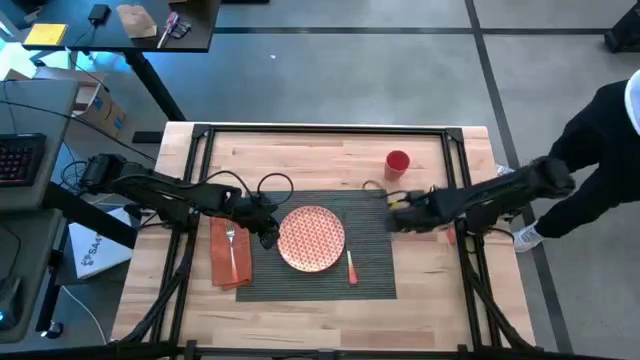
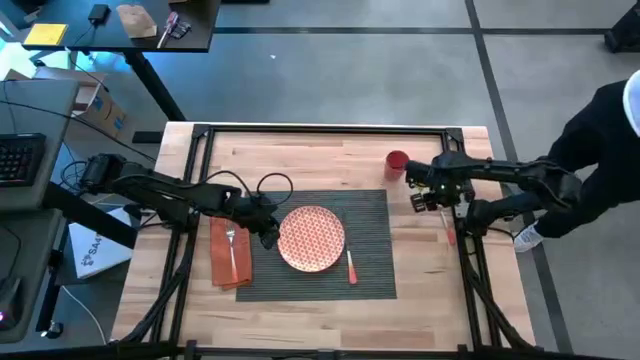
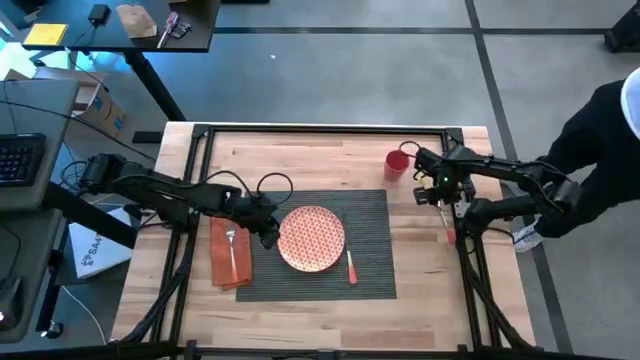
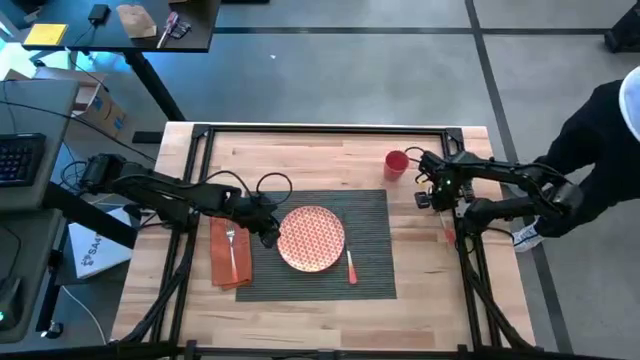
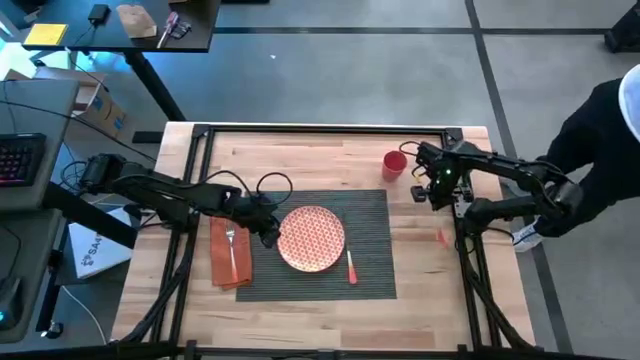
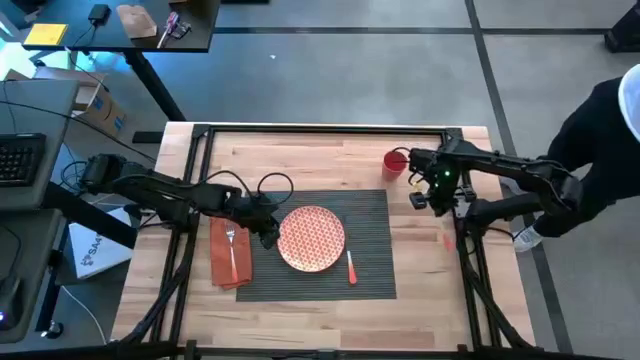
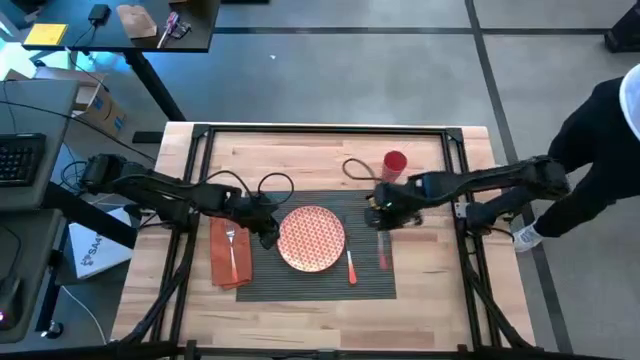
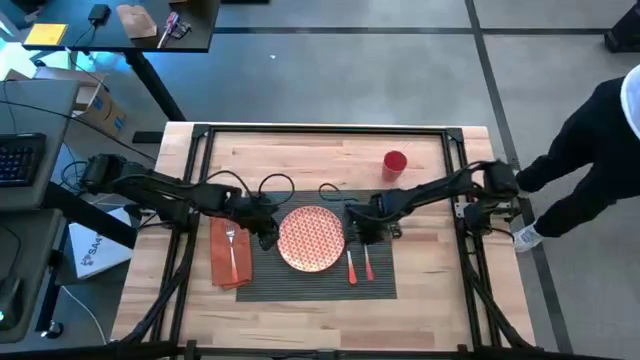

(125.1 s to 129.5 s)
Task: Set table place
Put the orange spoon to the right side of the orange knife on the gray placemat

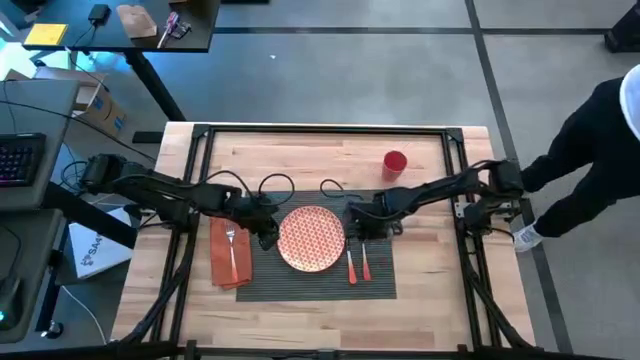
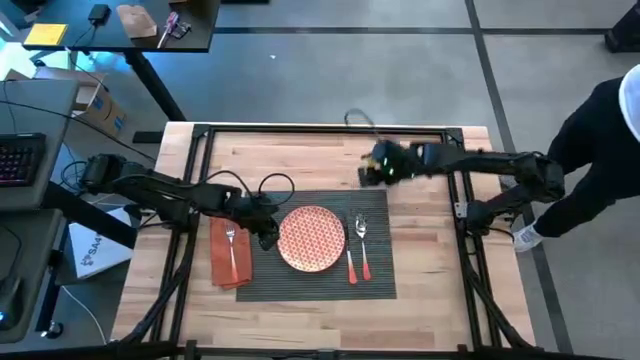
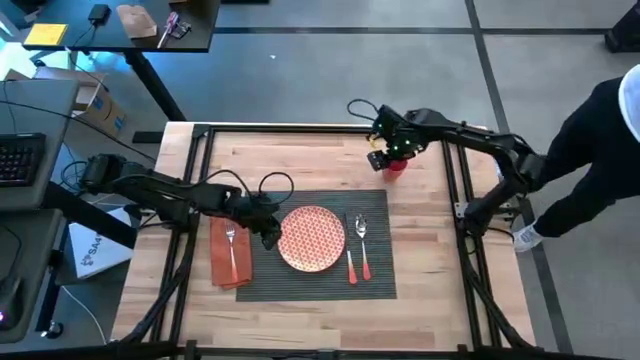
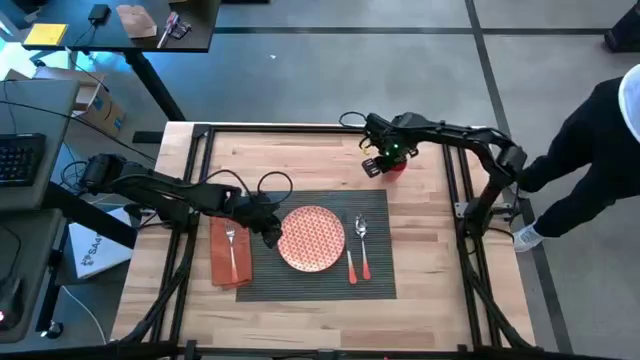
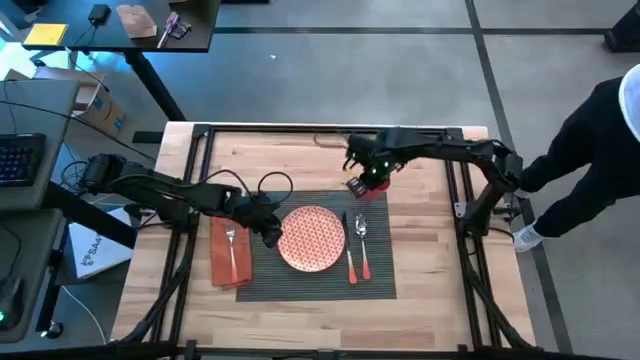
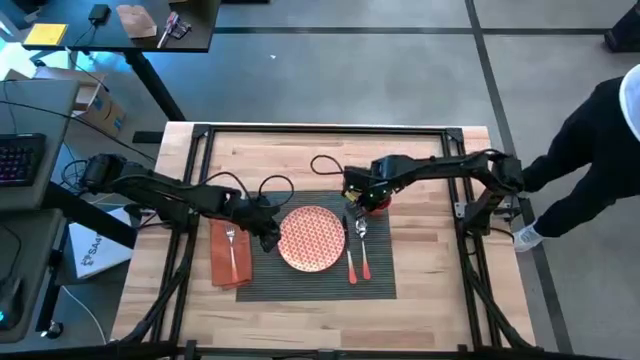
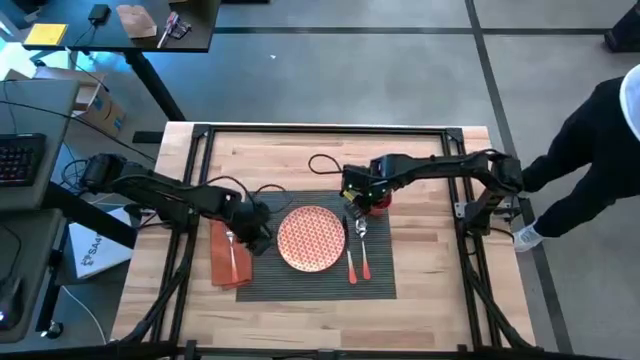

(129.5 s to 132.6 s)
Put the orange cup on the upper right of the placemat

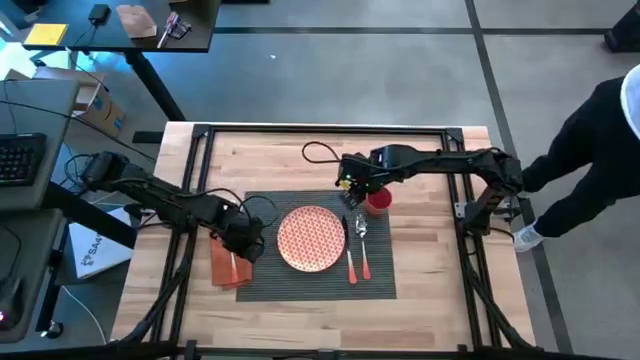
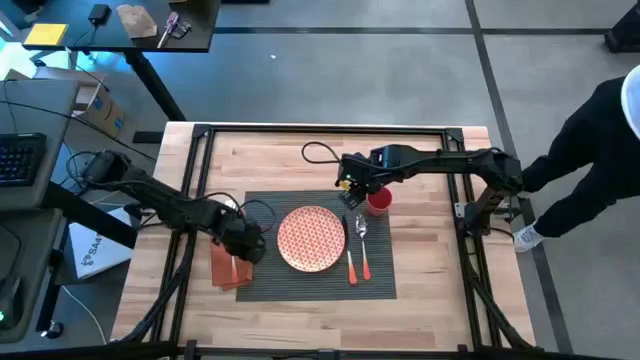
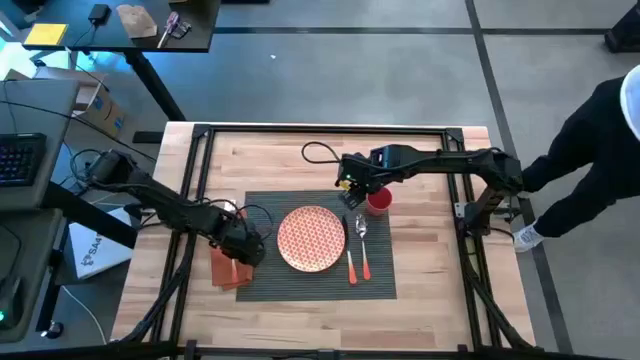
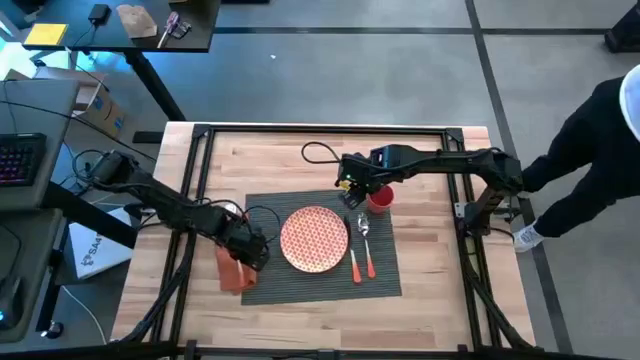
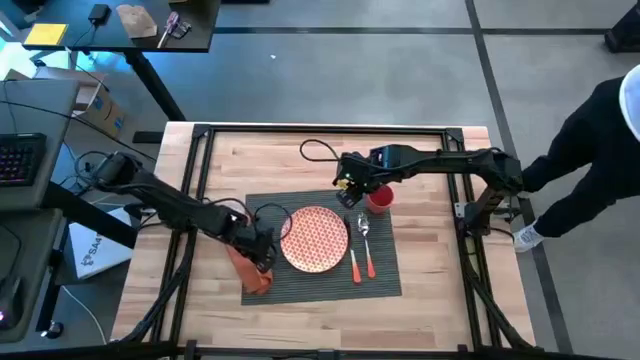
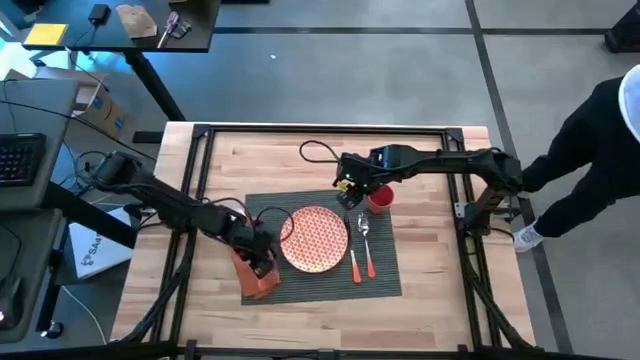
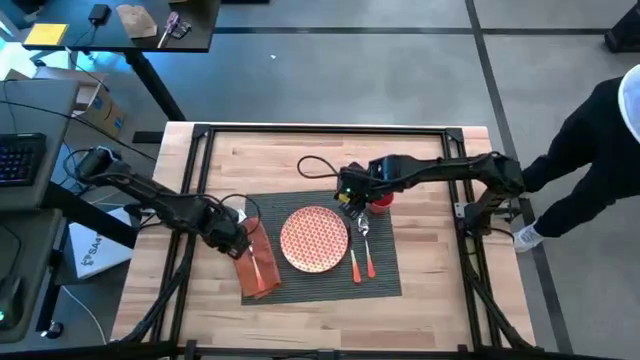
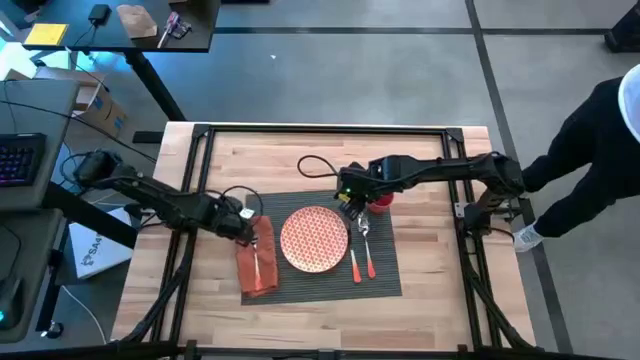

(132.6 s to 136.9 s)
Put the orange napkin to the left side of the orange plate on the gray placemat

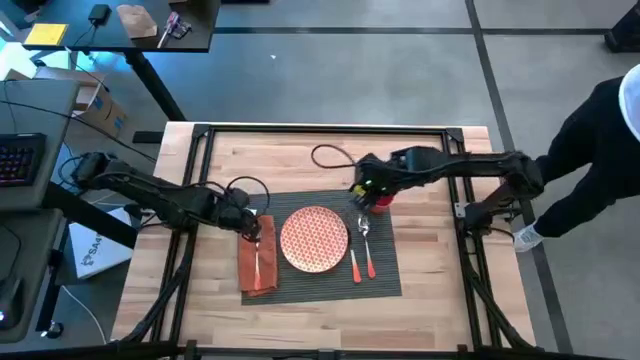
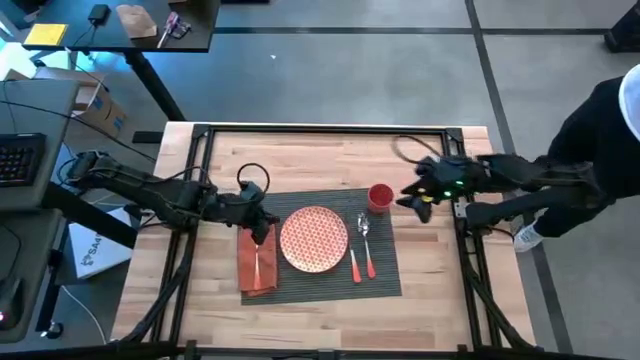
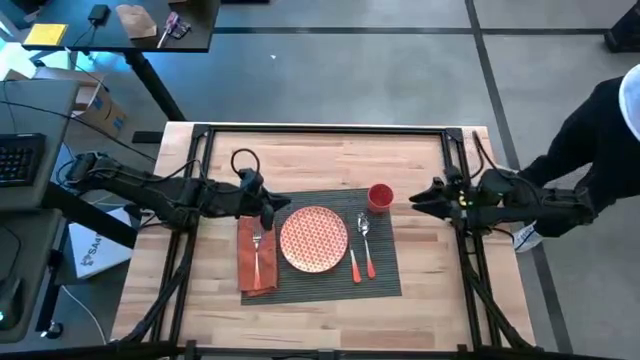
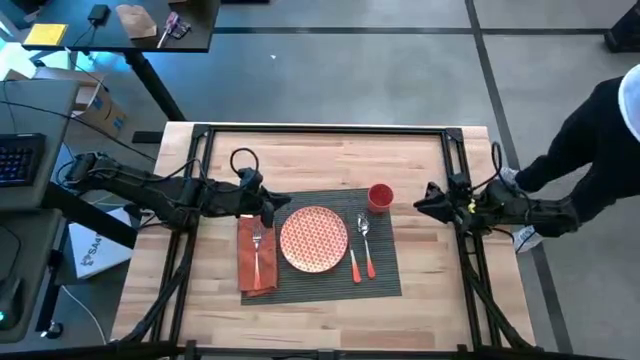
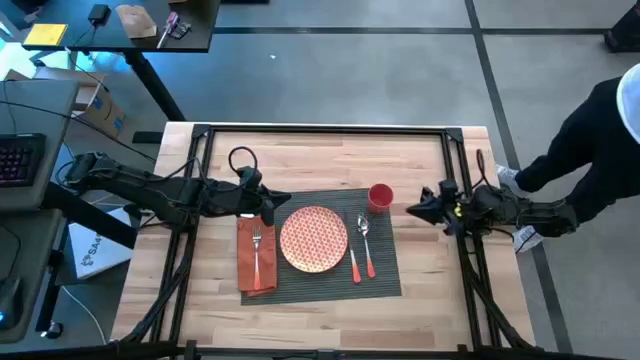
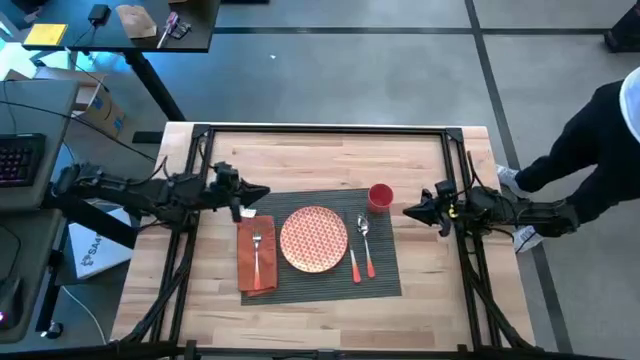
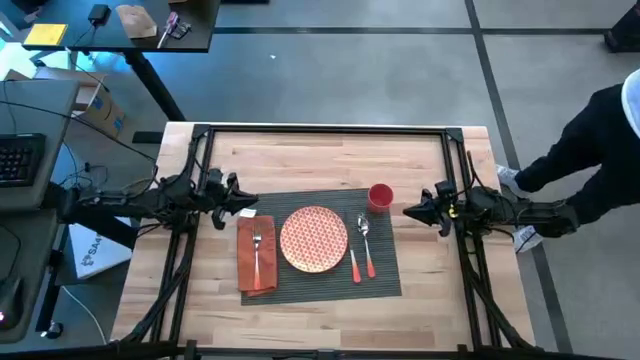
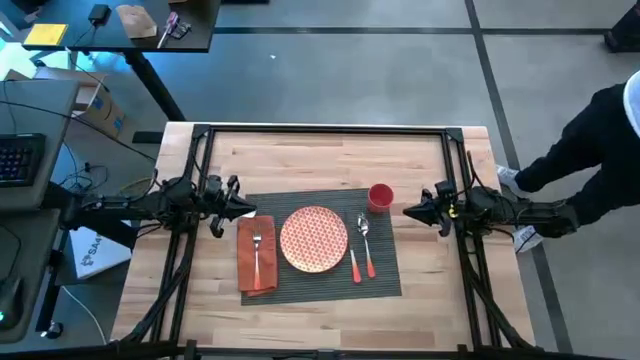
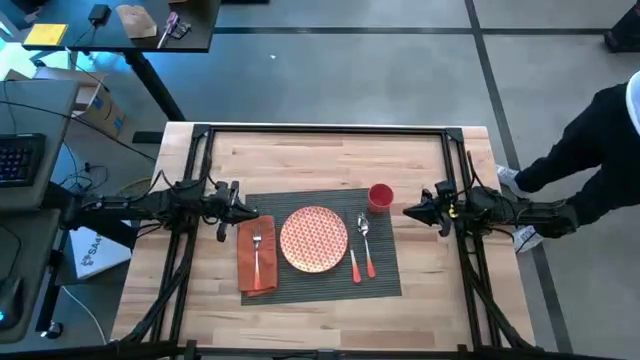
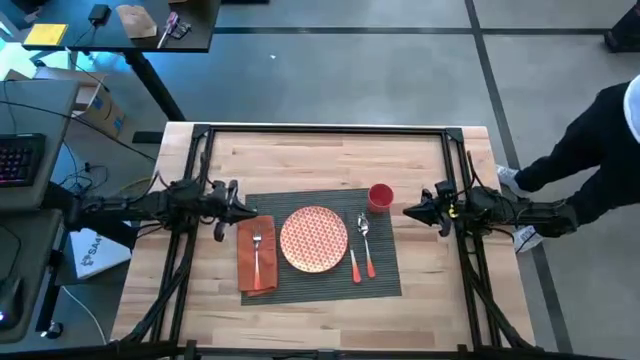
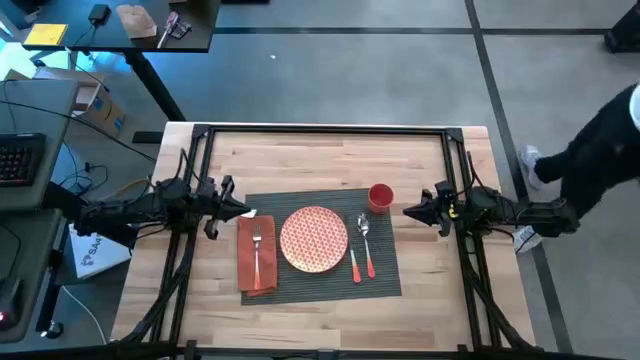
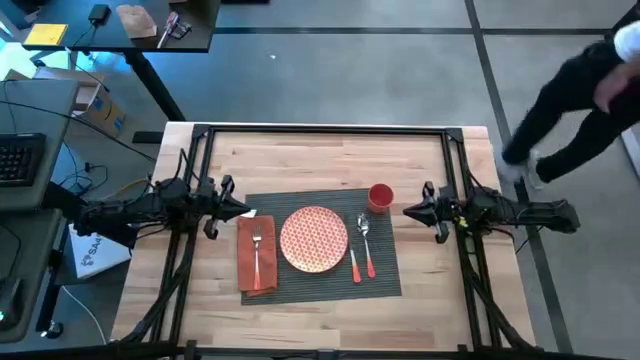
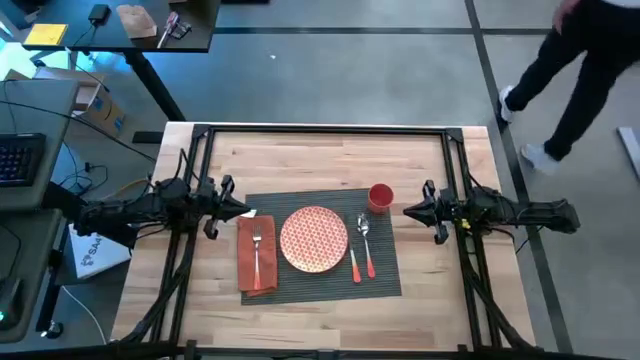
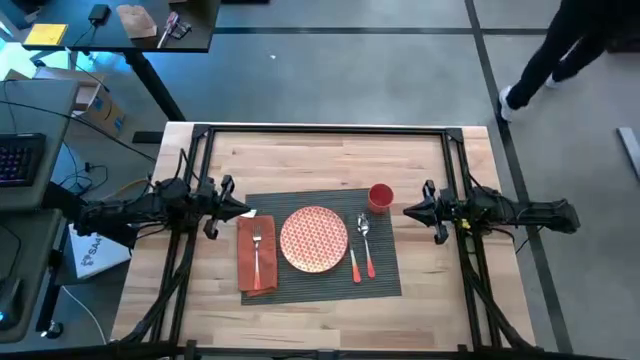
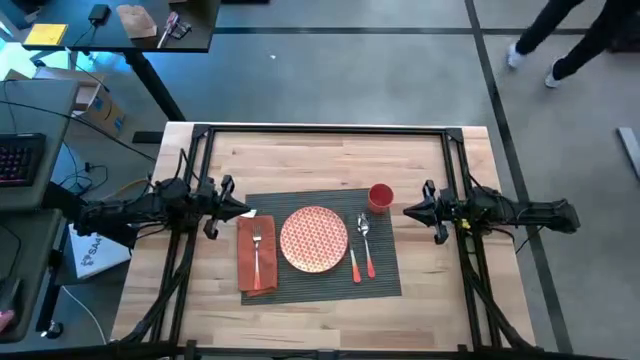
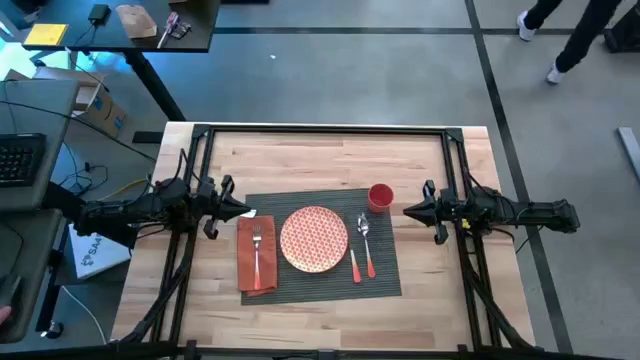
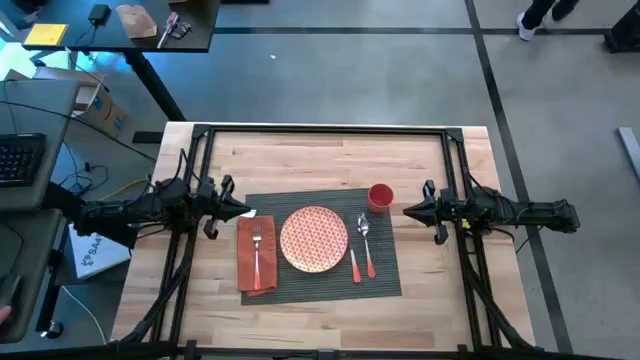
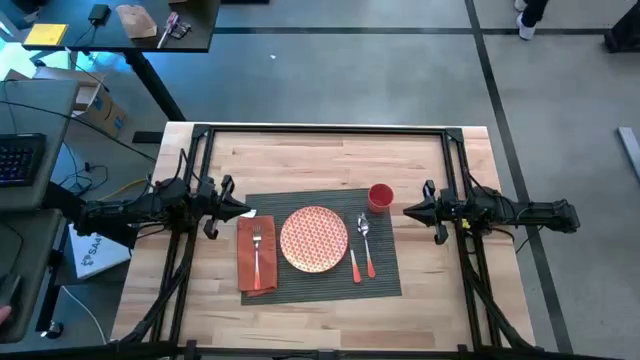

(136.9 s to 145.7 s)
Return to Home Position

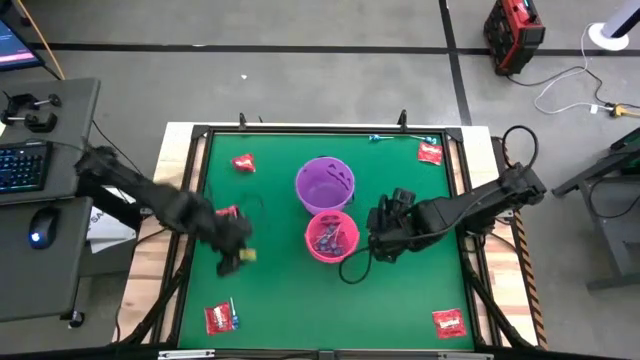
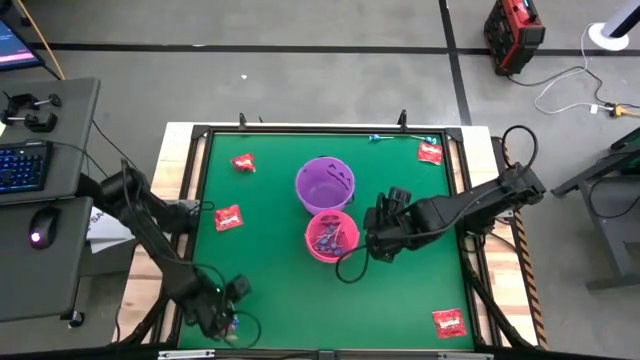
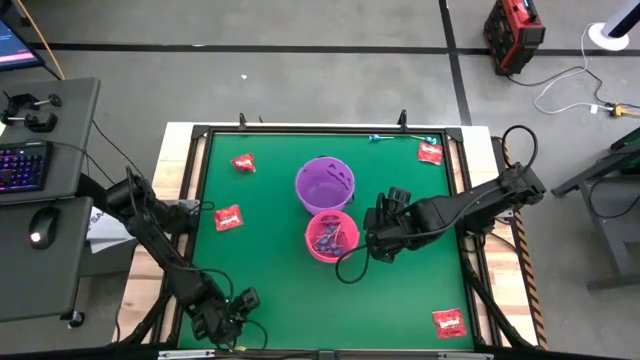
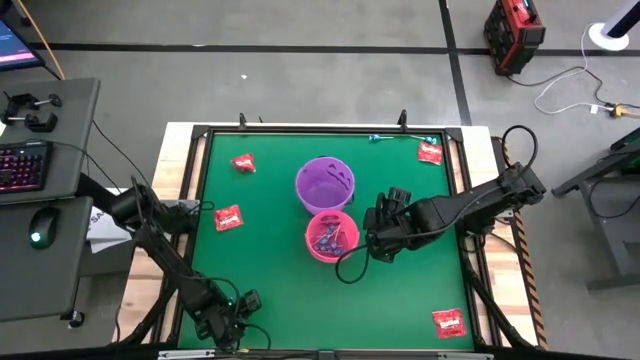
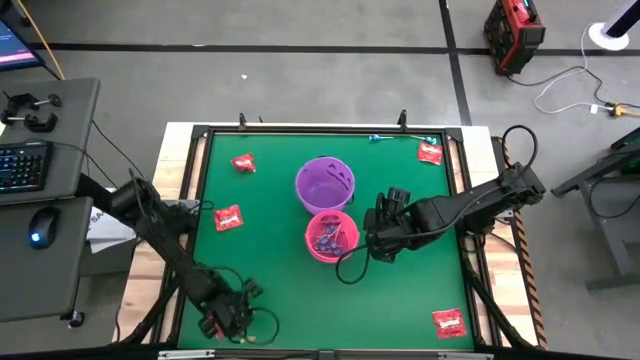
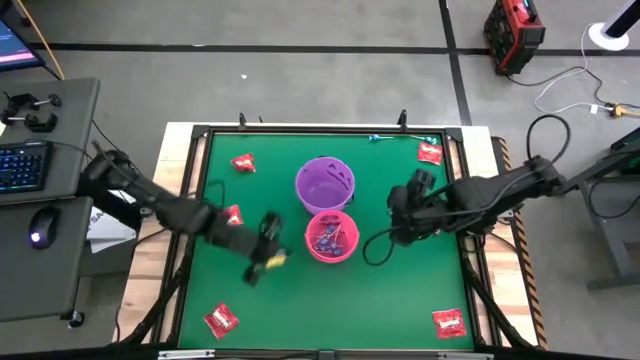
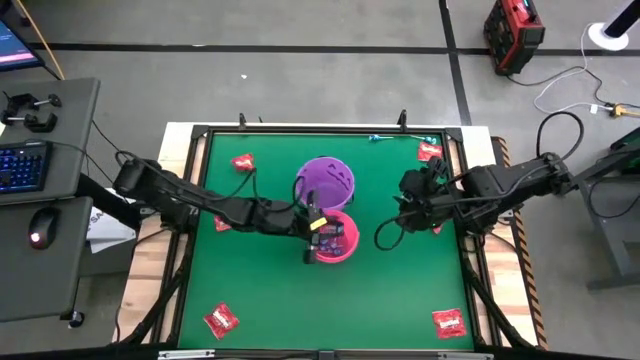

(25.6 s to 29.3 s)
Task: Sort candy by brand, put in halloween buckets
Put the blue candy into the pink bucket
